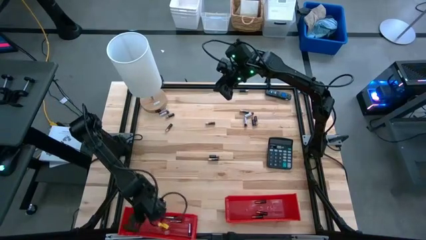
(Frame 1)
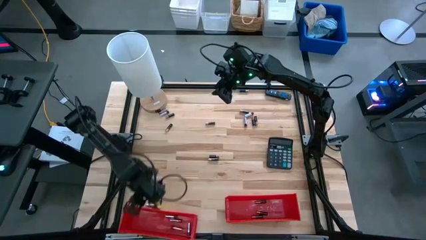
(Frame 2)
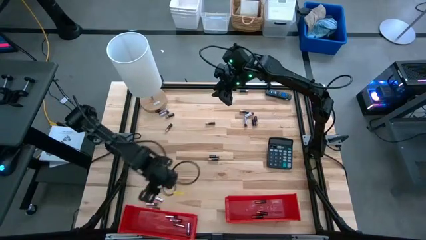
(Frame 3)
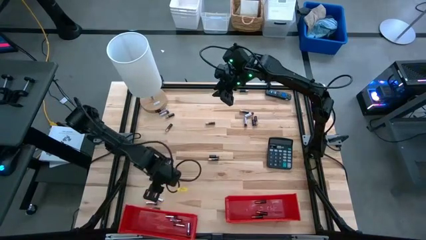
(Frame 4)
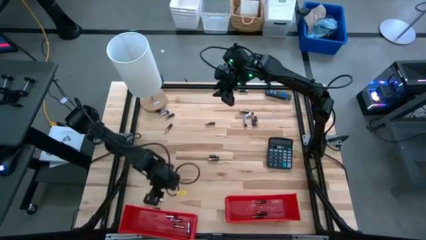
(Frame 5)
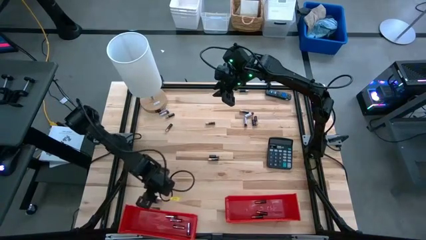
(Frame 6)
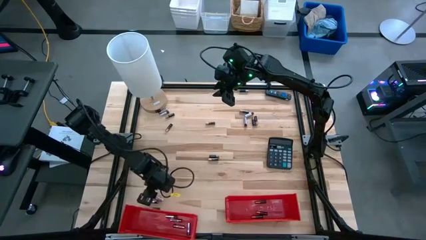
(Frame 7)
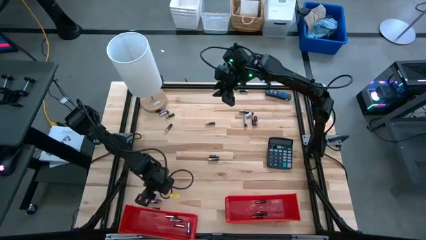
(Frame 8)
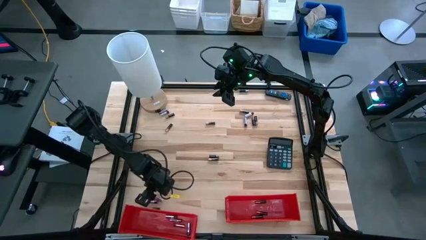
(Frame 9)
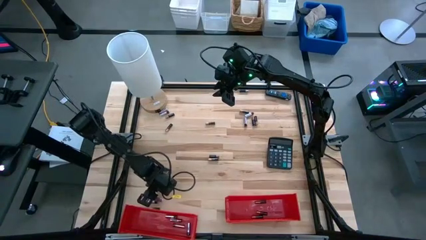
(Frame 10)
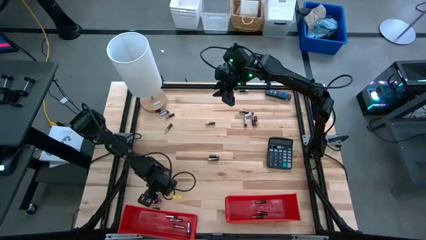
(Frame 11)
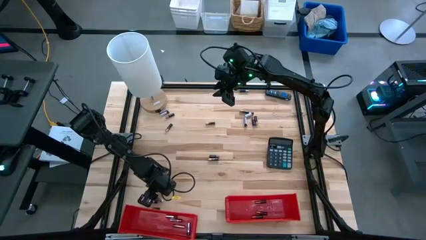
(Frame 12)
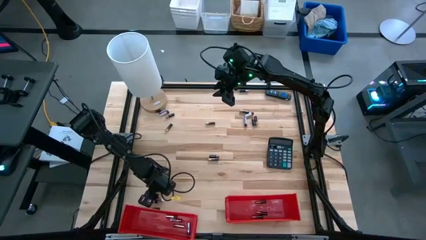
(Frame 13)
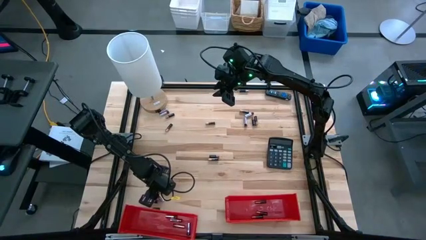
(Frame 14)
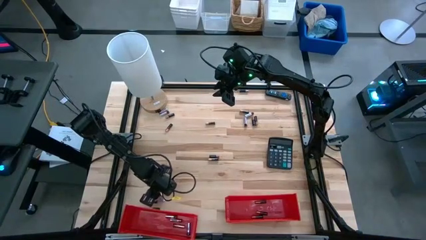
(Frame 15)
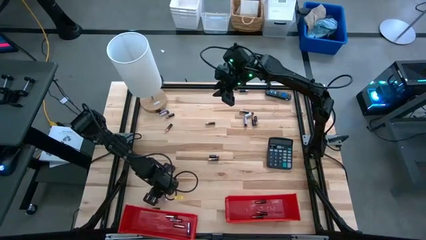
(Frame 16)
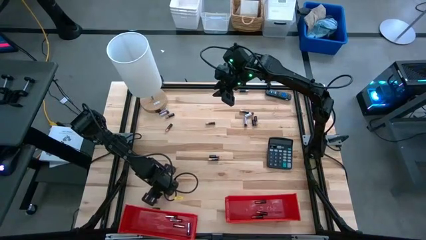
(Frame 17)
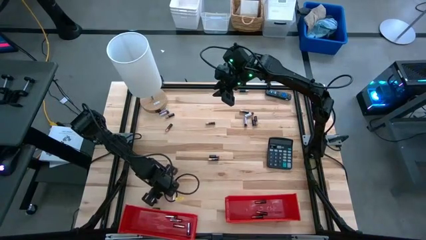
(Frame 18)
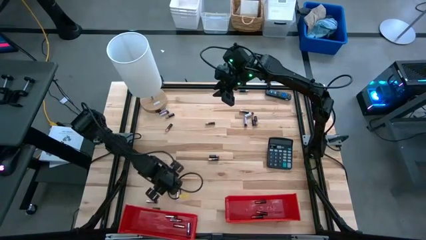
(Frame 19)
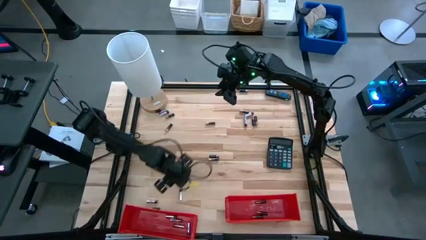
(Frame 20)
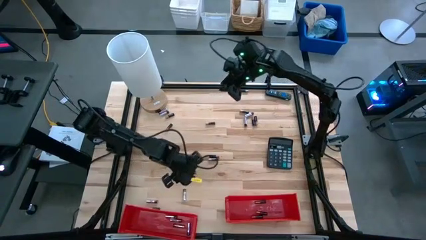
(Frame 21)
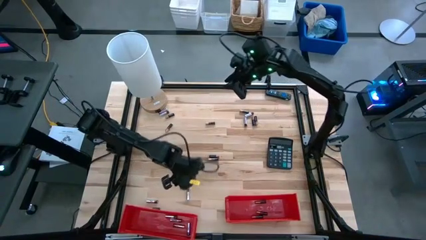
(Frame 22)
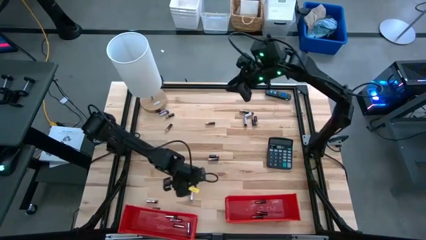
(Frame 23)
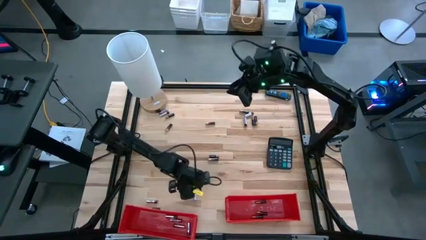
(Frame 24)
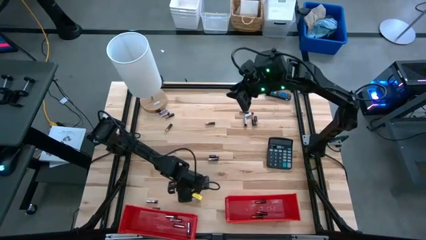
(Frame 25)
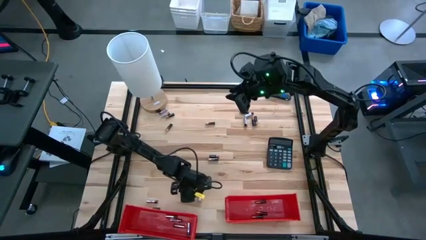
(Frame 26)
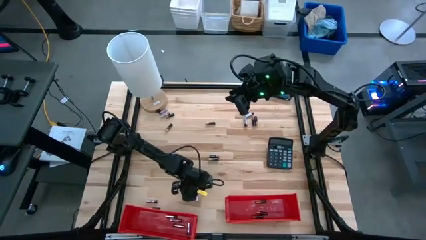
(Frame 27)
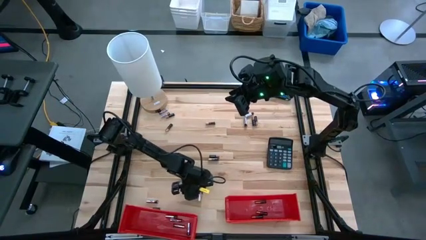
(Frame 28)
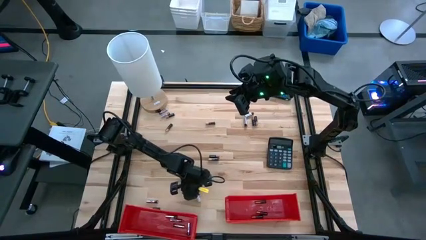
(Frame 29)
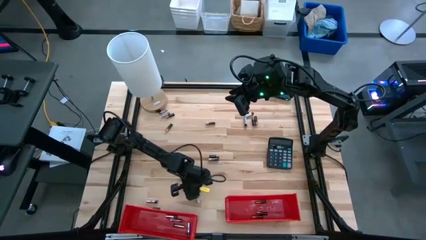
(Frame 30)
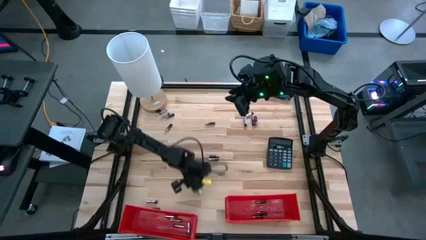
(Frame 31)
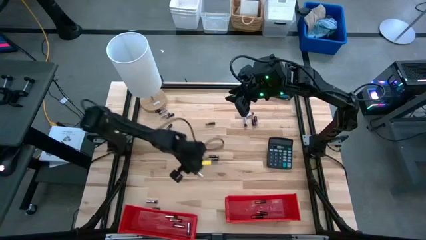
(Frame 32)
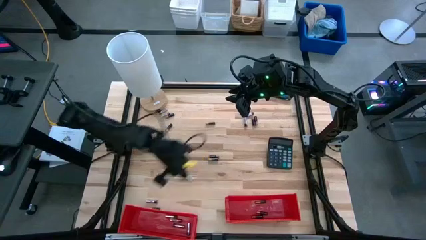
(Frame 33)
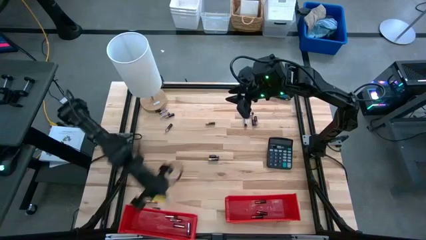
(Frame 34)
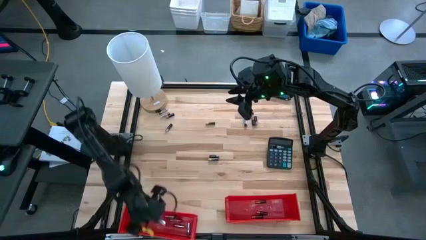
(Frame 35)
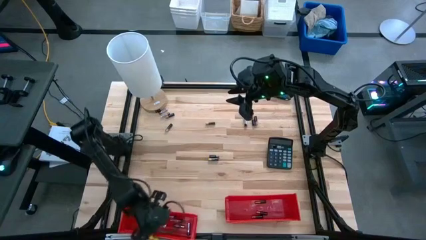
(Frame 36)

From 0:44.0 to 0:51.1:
Task: Sort batteries
Put the silver battery into the left red bin

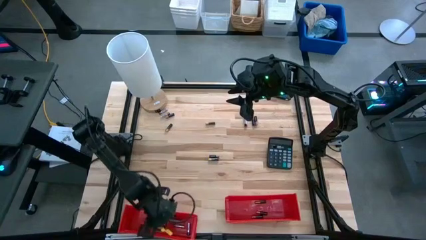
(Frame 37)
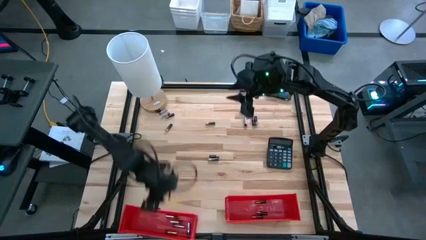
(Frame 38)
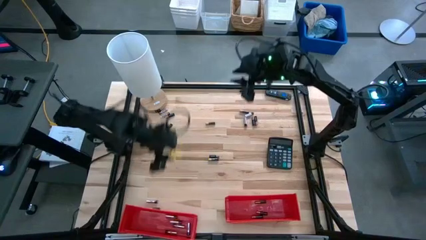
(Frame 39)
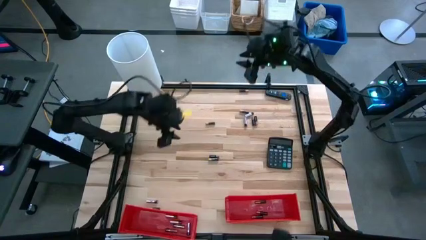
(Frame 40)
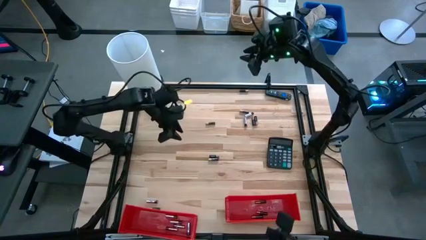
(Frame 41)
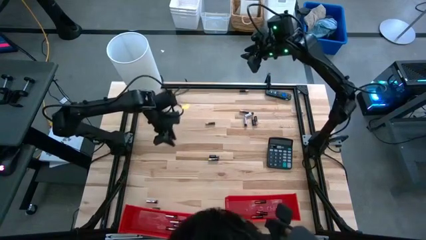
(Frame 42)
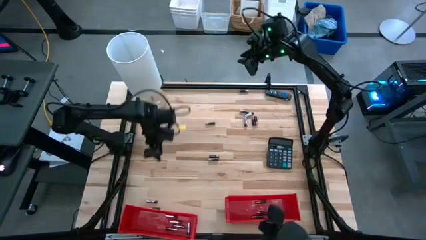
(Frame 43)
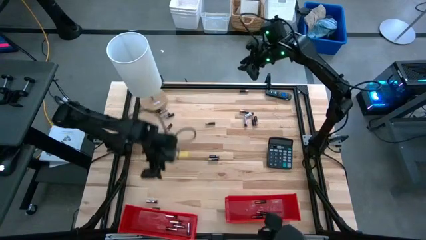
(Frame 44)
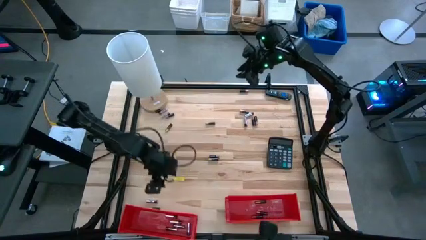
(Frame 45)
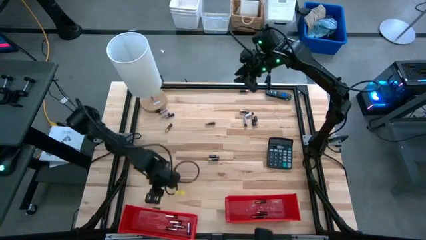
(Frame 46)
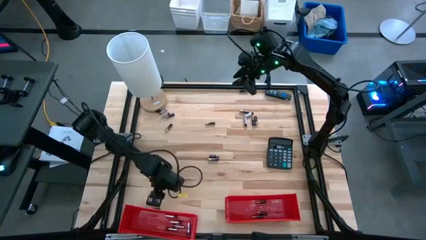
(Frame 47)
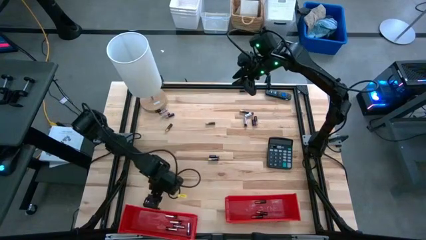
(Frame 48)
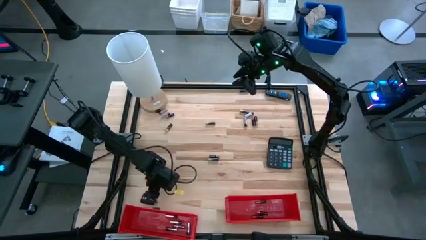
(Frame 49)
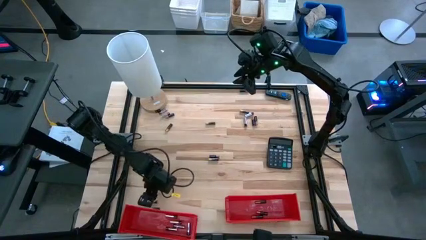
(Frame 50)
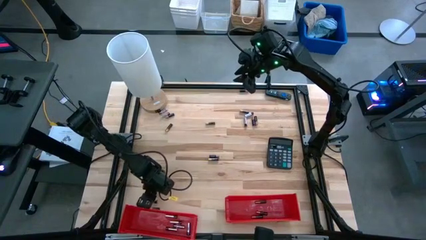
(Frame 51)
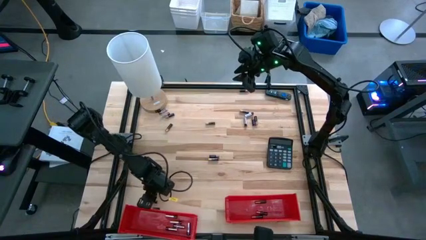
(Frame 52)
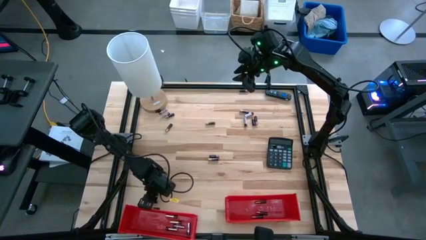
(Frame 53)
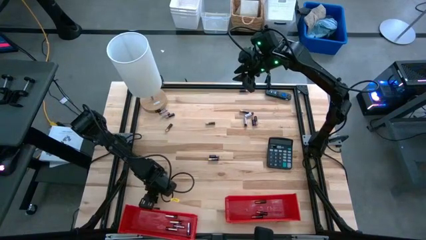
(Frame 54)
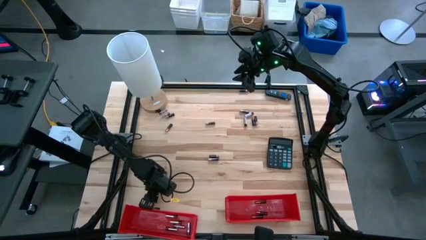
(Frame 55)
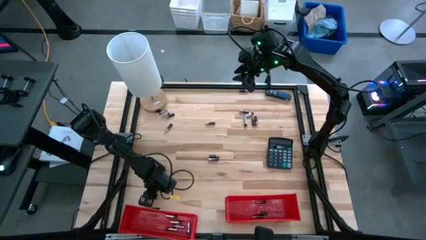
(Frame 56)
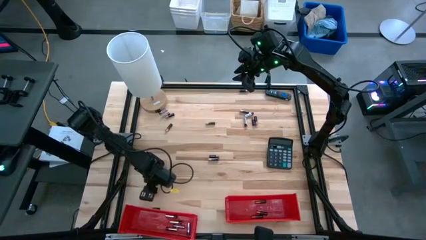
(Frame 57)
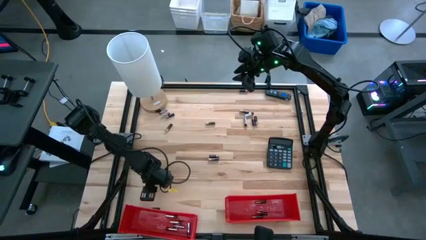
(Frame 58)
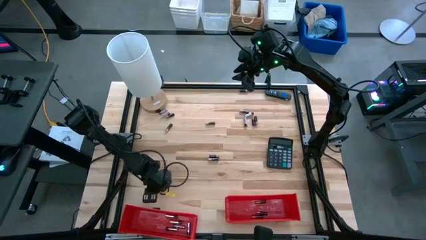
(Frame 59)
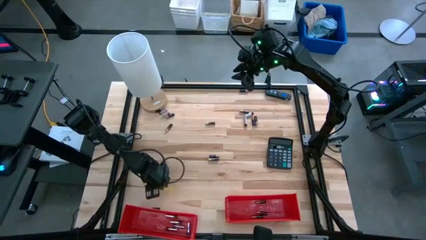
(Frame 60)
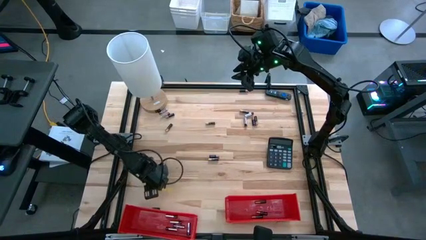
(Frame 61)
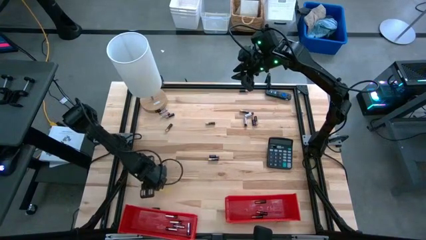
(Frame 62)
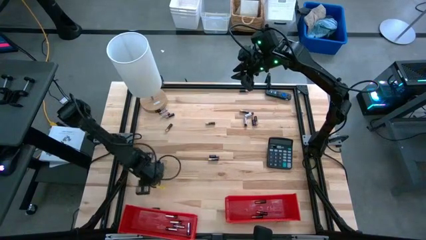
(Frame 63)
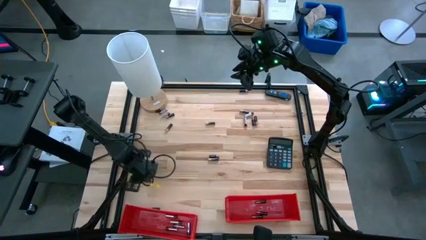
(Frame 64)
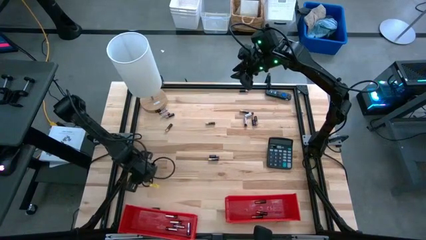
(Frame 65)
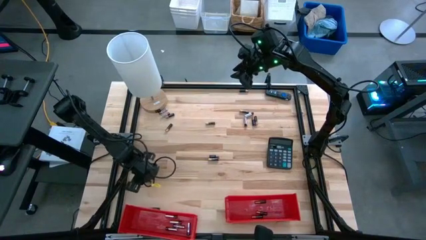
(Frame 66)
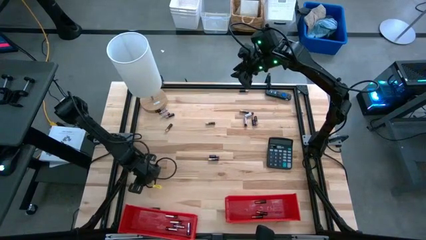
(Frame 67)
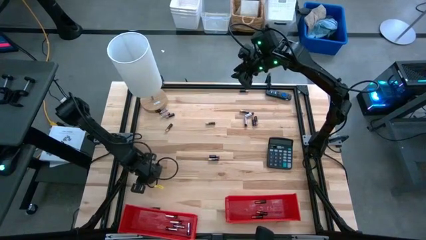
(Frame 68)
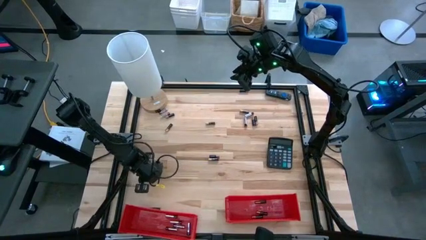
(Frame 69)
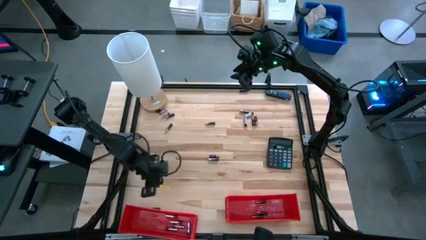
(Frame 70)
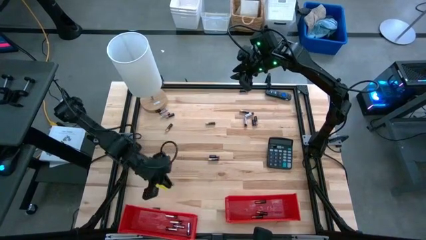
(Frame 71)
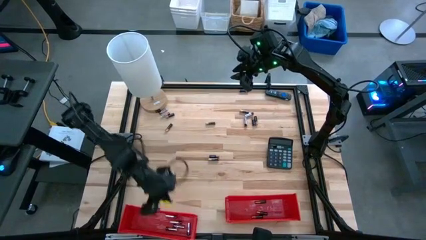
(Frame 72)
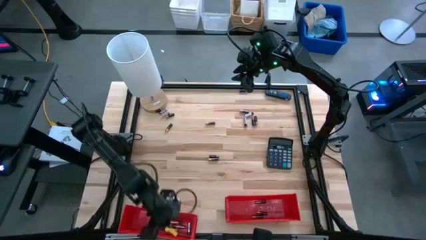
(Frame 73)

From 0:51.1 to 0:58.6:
Put the silver battery into the left red bin

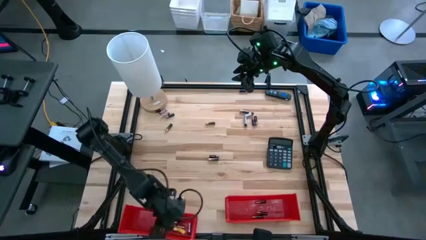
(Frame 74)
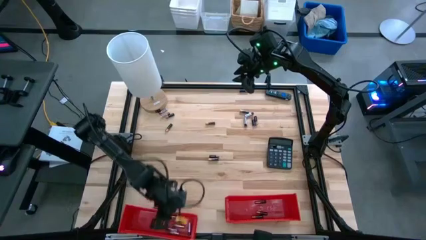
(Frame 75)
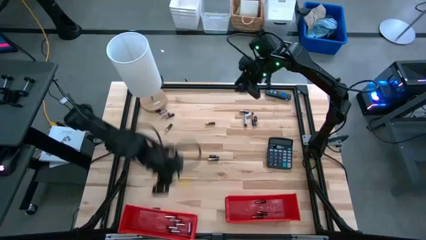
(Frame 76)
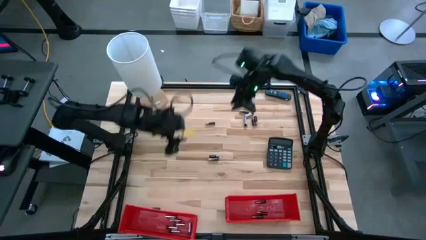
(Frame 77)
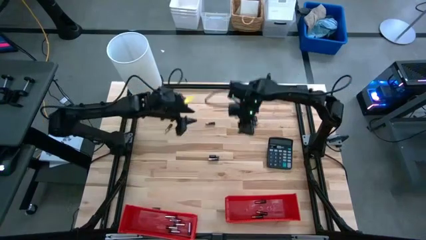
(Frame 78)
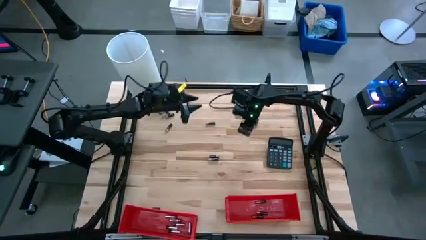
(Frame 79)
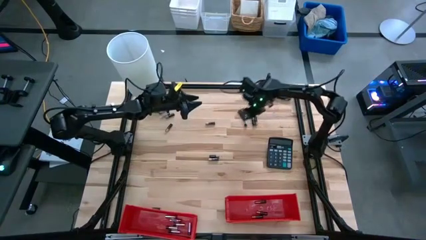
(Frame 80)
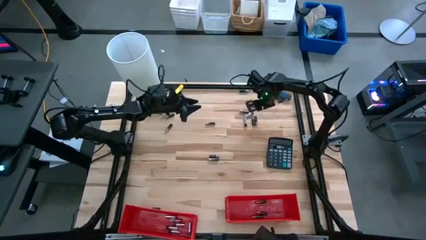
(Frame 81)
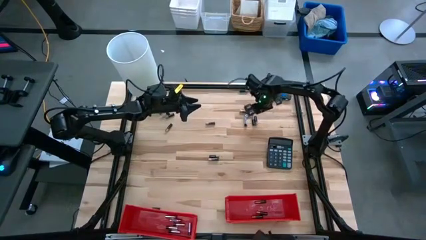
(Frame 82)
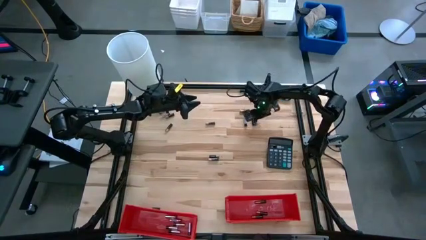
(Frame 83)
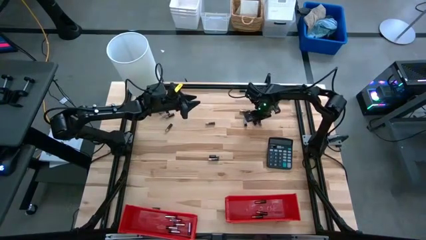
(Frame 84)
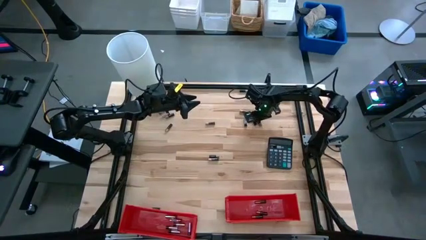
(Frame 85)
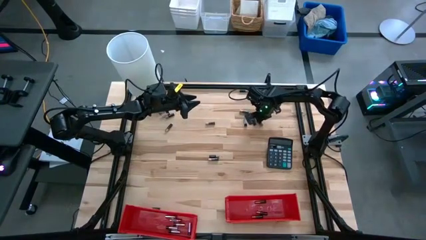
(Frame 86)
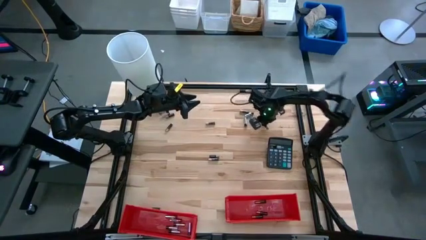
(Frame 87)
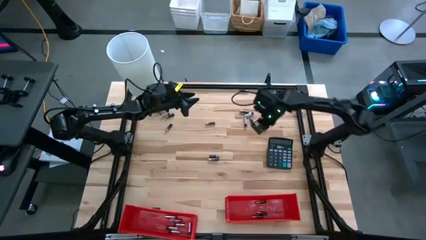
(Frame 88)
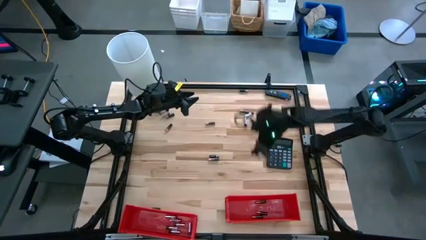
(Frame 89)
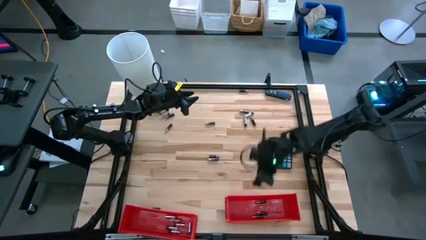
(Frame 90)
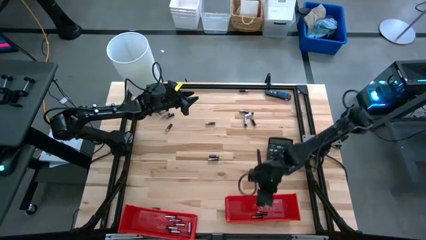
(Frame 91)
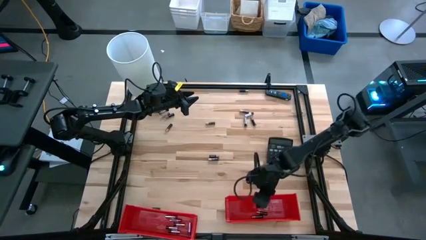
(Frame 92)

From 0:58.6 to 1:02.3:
Put the black-brown battery into the right red bin
